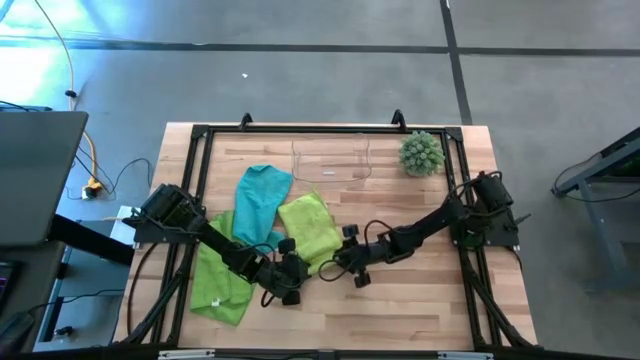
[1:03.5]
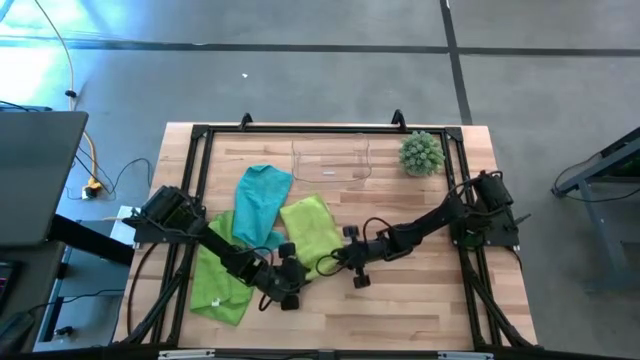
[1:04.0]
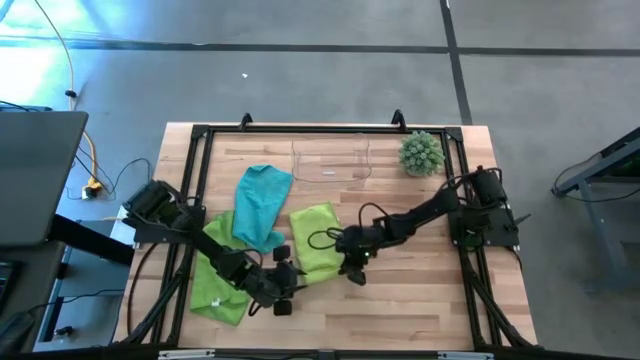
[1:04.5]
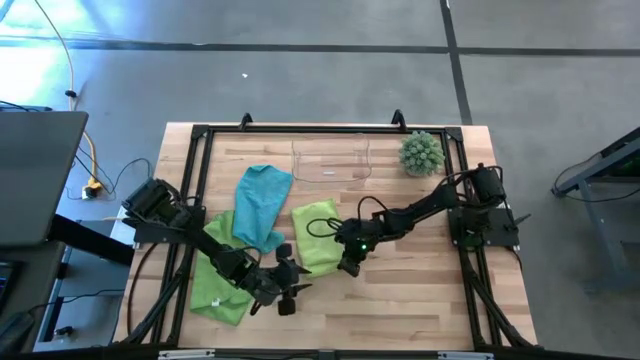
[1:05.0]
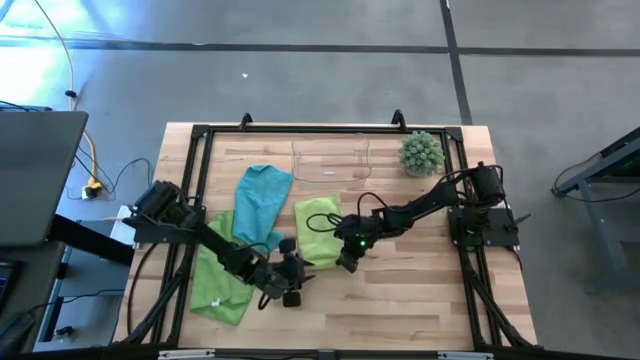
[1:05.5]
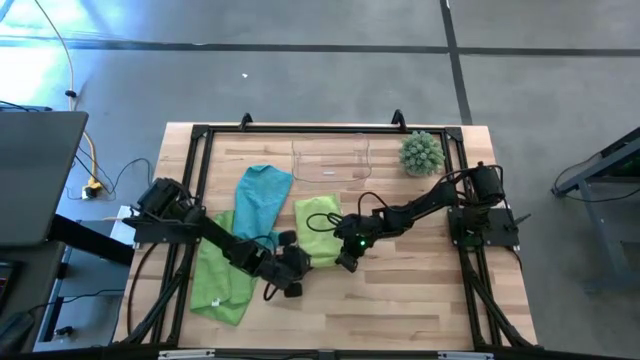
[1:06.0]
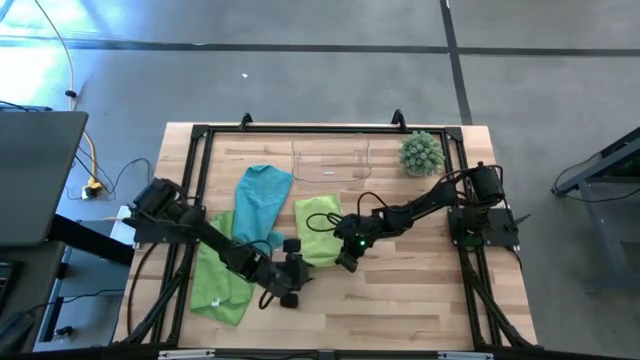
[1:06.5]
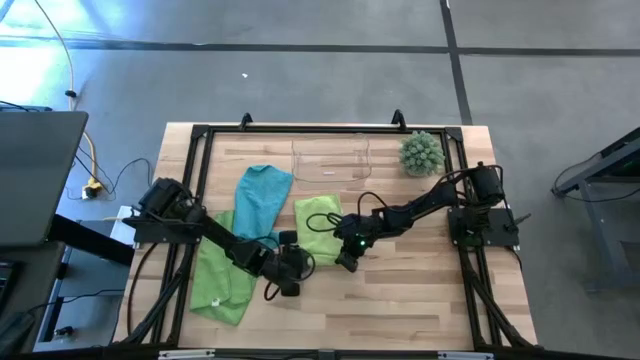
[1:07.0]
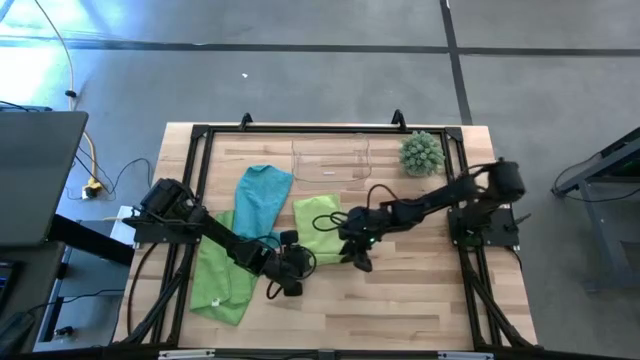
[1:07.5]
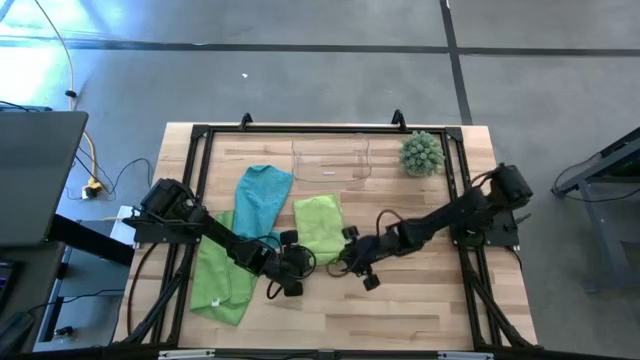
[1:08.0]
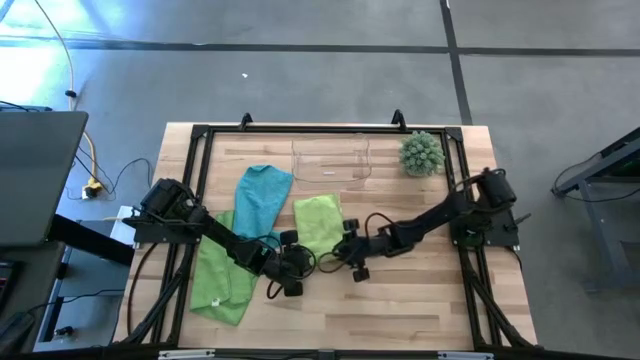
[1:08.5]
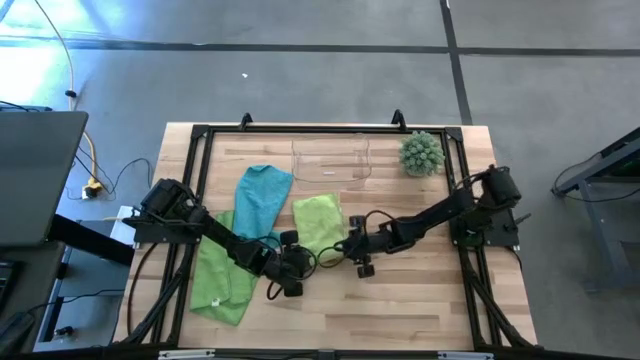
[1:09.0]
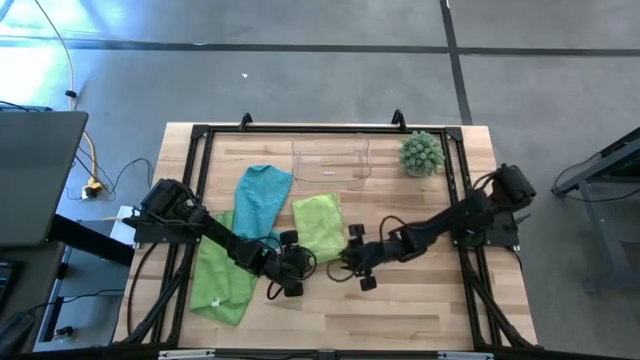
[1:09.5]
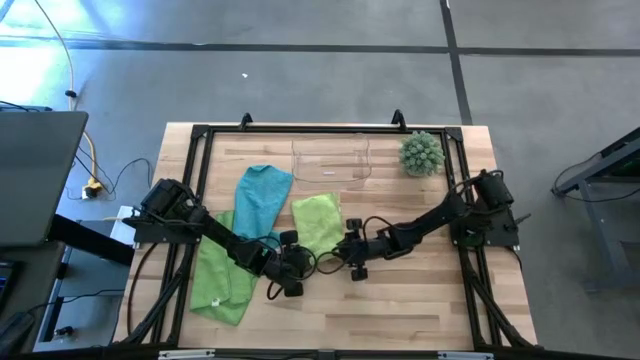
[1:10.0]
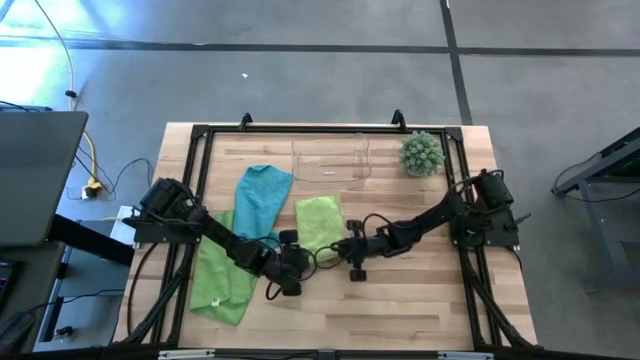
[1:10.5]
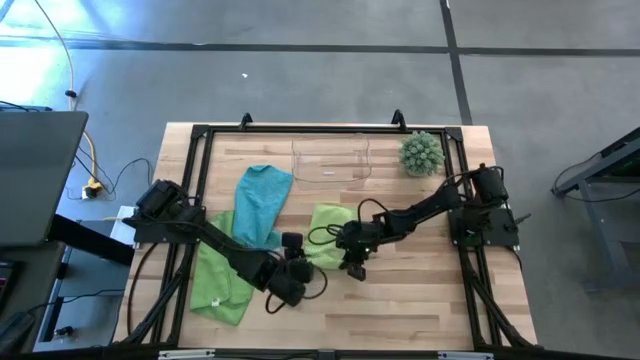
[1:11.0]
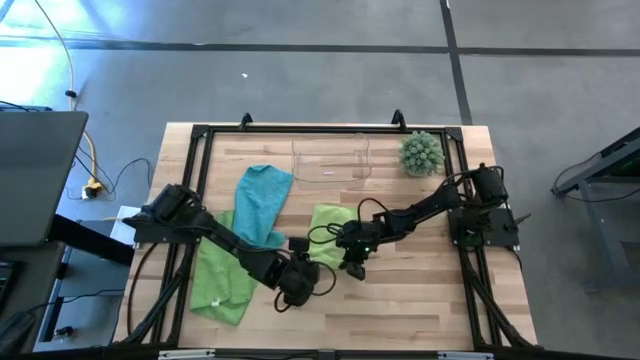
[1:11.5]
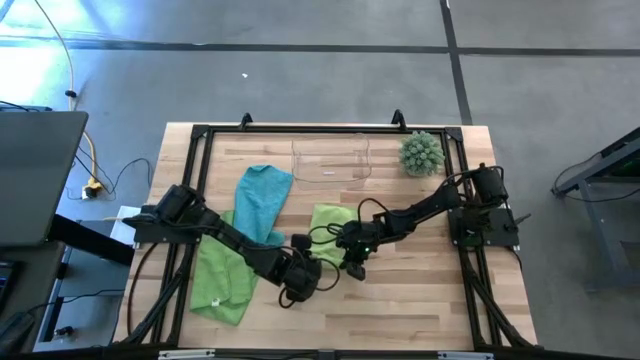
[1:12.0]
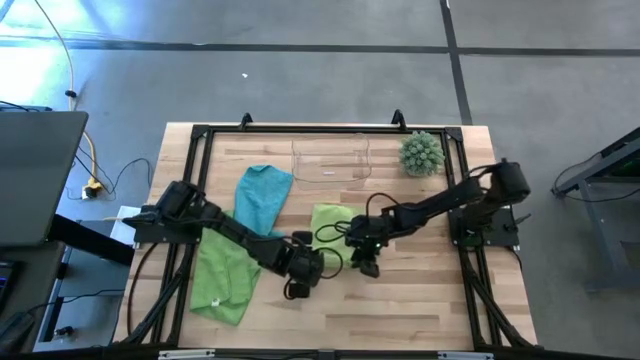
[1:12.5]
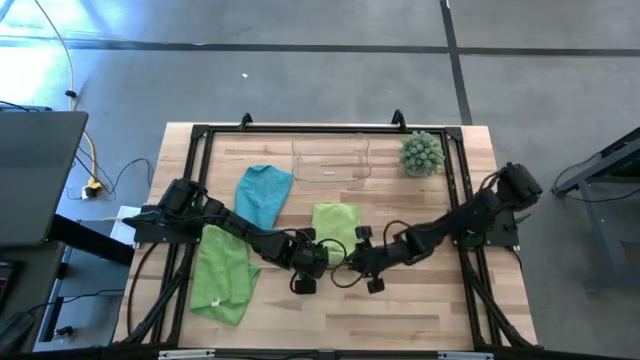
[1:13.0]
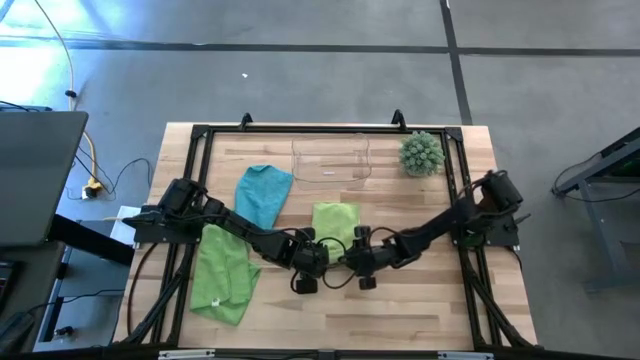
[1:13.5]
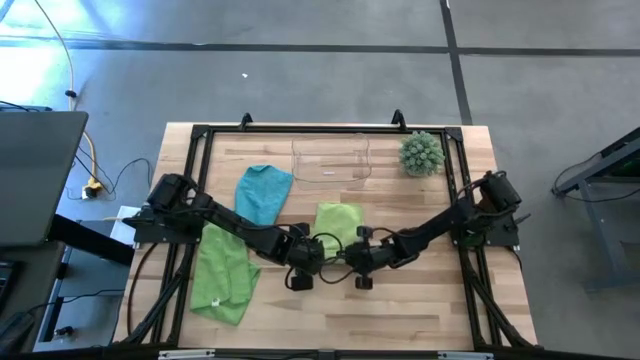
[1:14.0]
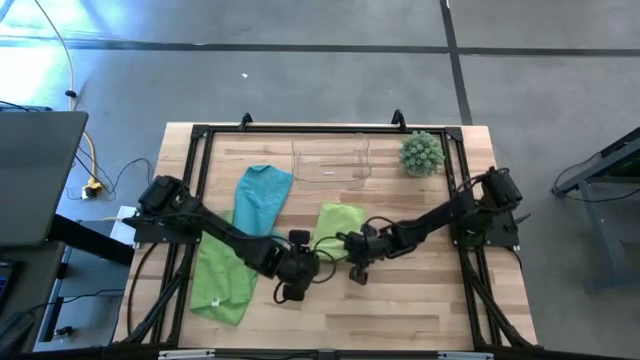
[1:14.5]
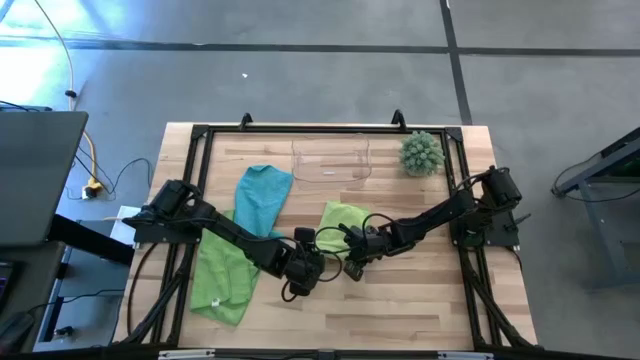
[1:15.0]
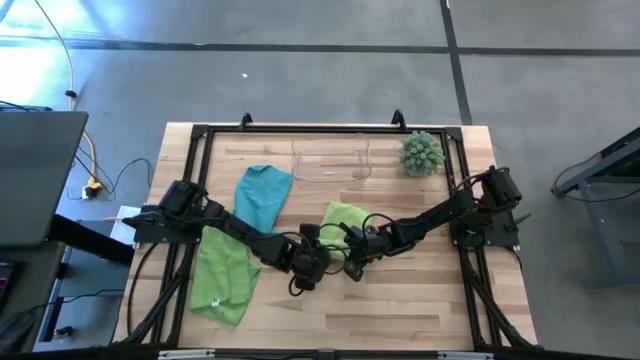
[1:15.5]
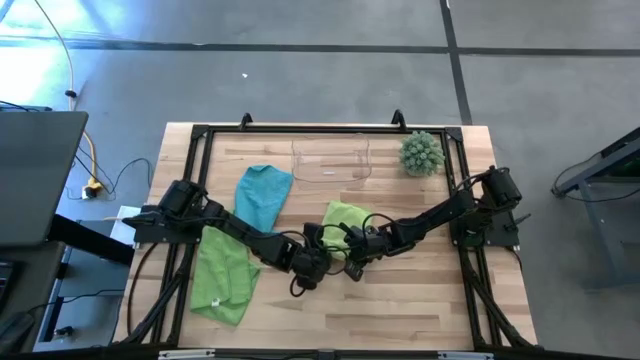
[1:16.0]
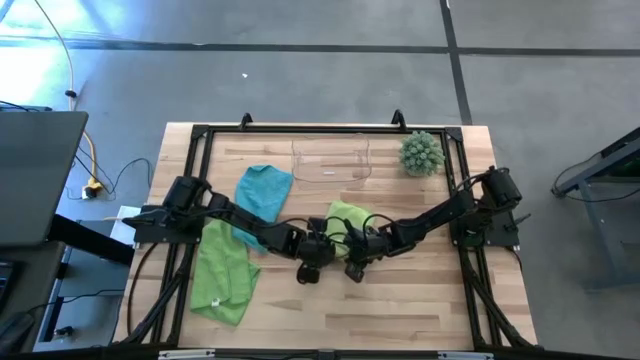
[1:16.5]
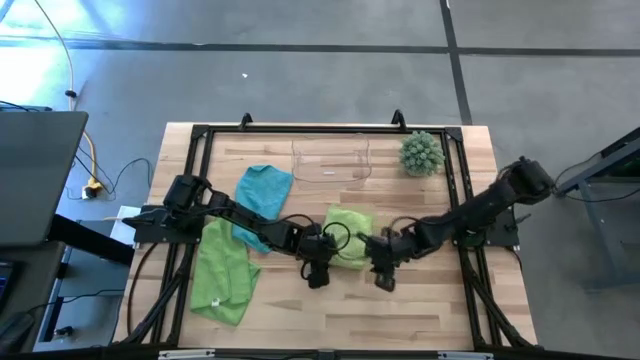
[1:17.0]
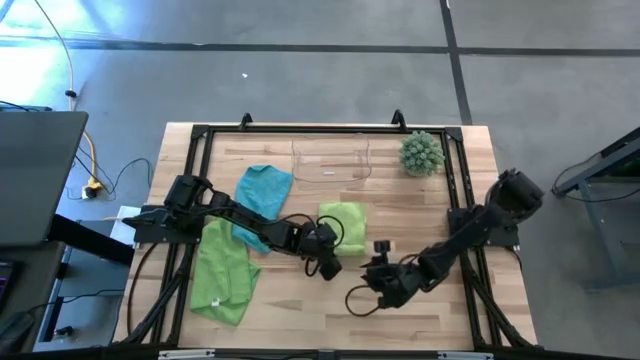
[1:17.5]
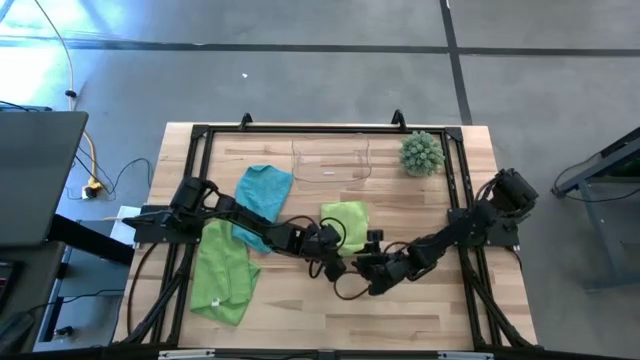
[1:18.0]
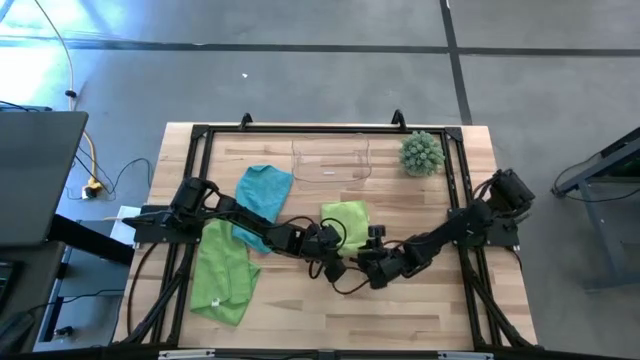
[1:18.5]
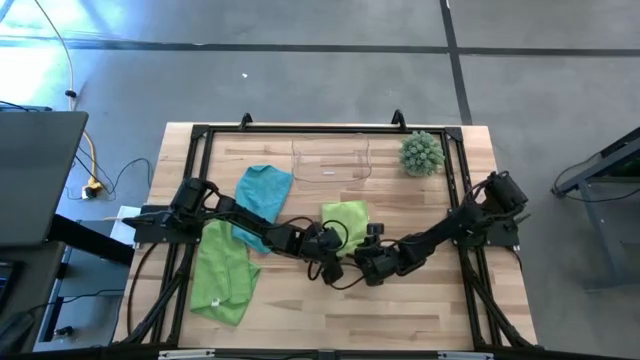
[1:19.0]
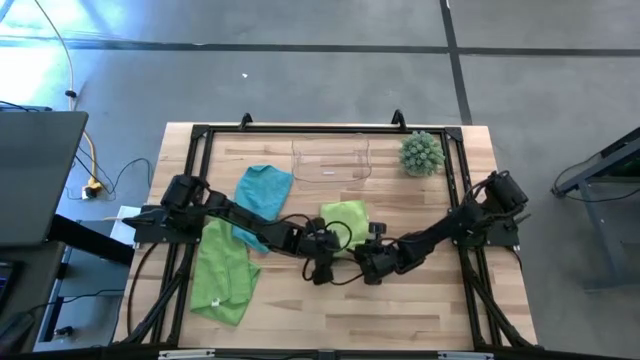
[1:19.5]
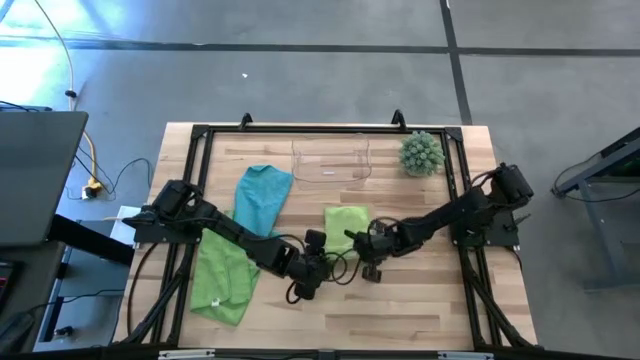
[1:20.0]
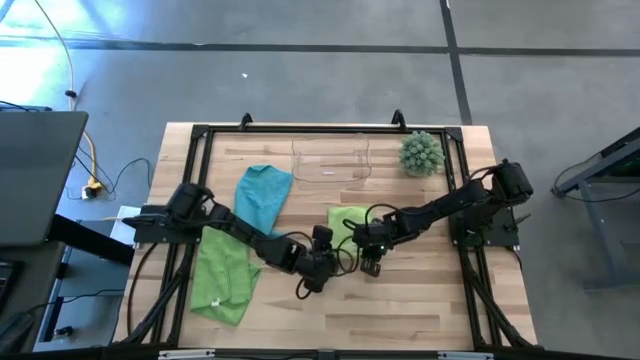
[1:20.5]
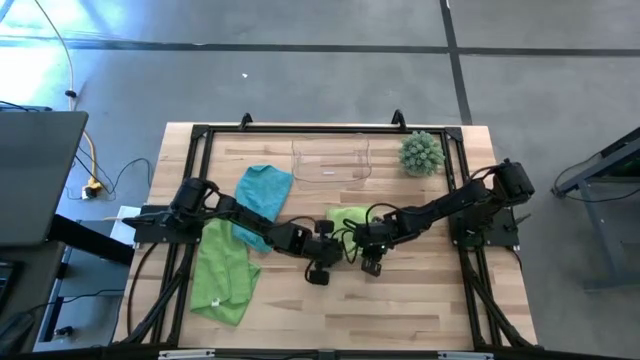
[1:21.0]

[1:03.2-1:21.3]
Task: Roll microfiber towels into tight, uniform cylinder then place into a basket
Roll the light green microfiber cloth

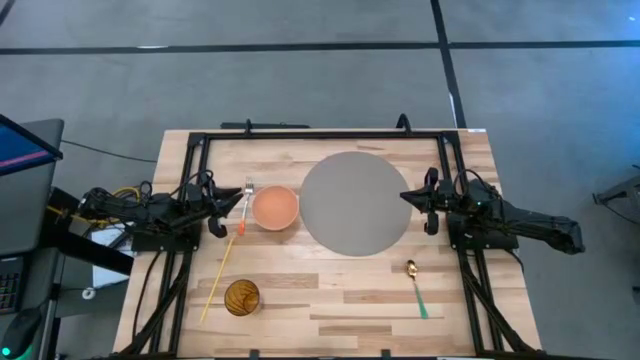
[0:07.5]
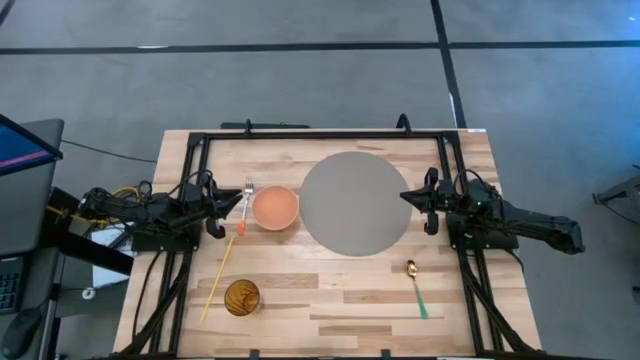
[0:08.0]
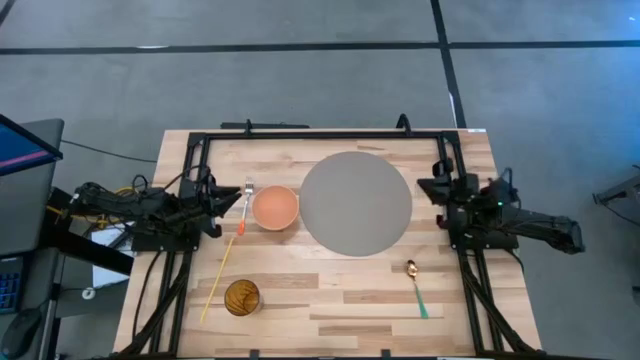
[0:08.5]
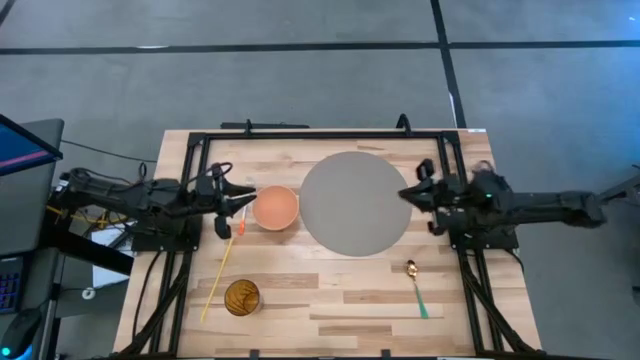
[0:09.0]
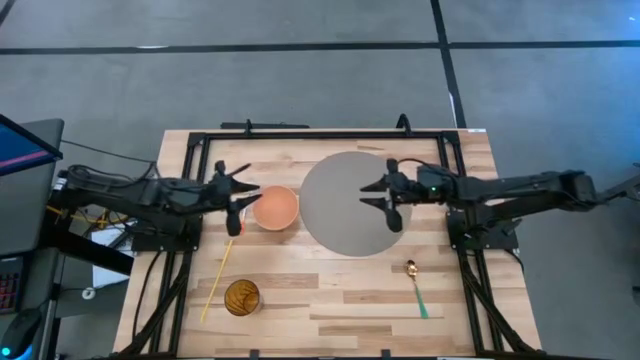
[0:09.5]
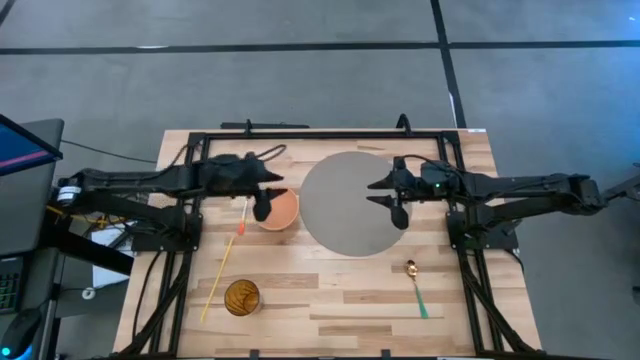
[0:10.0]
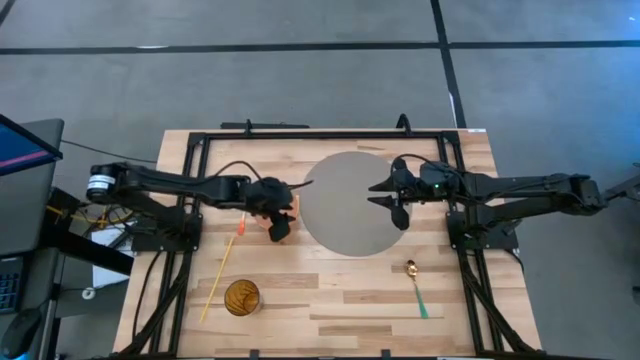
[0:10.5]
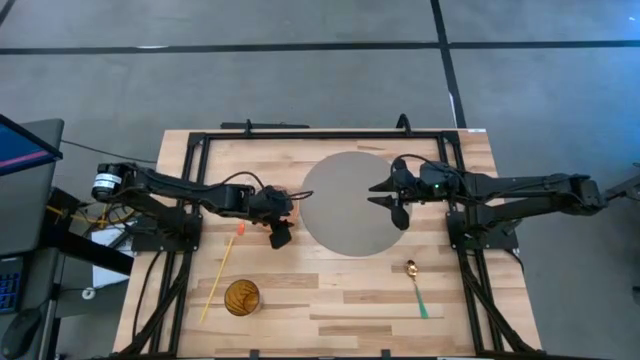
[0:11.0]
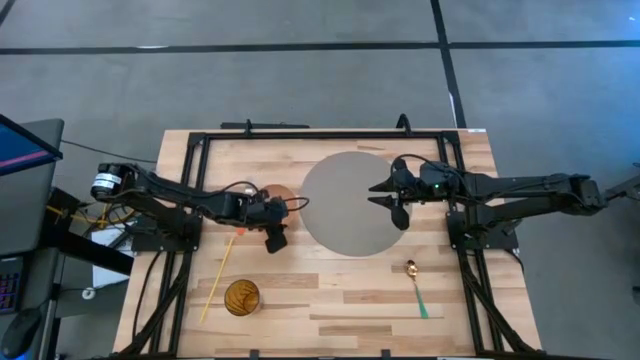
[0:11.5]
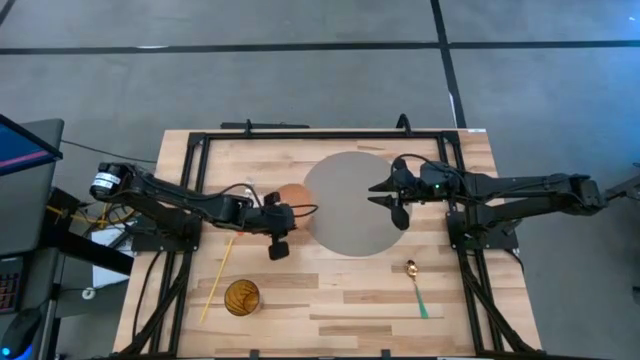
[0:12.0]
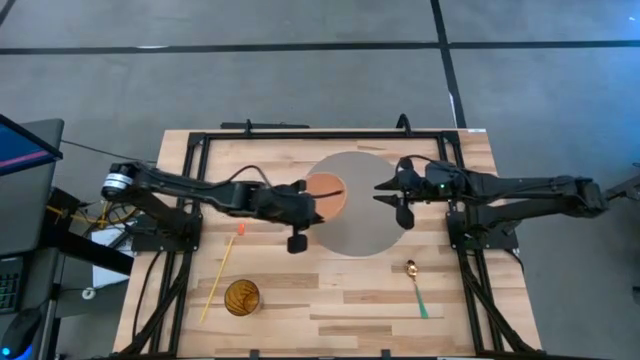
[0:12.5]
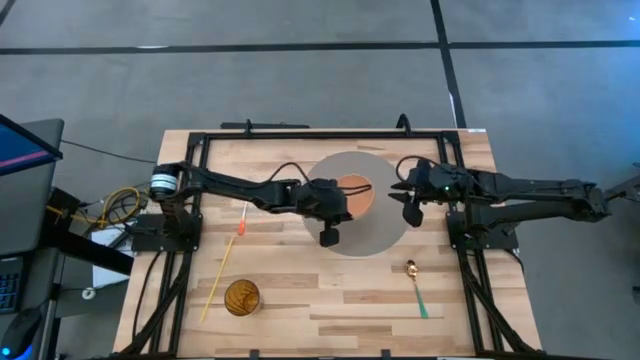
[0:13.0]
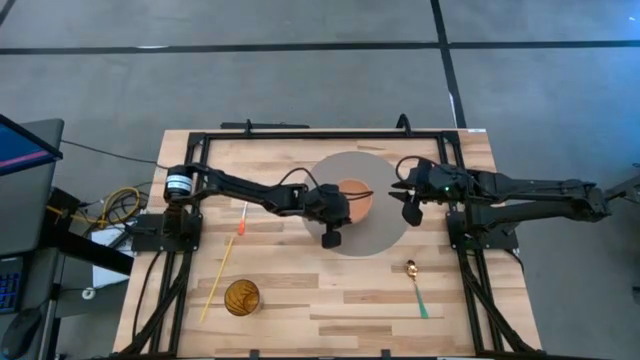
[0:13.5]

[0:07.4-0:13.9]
Task: Pick & Place Utensil
Put the orange bowl on the gray mat
